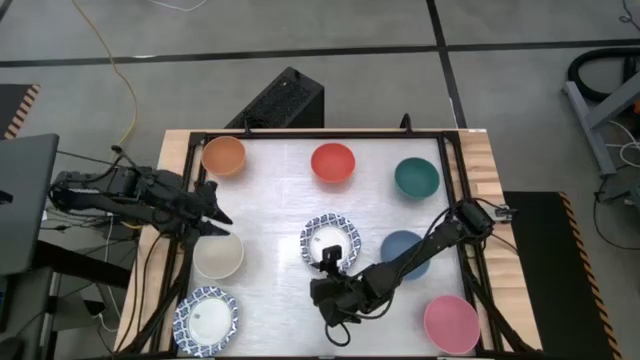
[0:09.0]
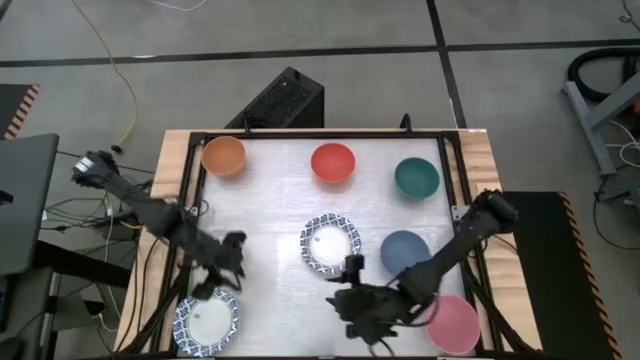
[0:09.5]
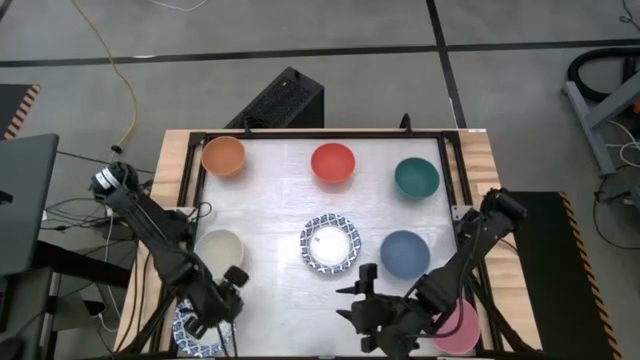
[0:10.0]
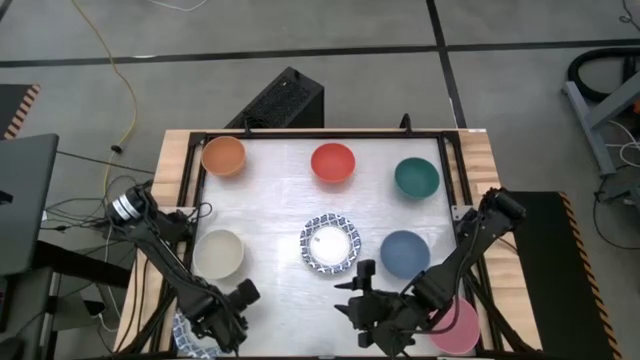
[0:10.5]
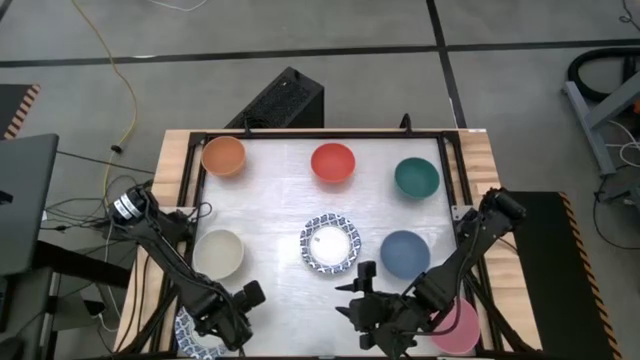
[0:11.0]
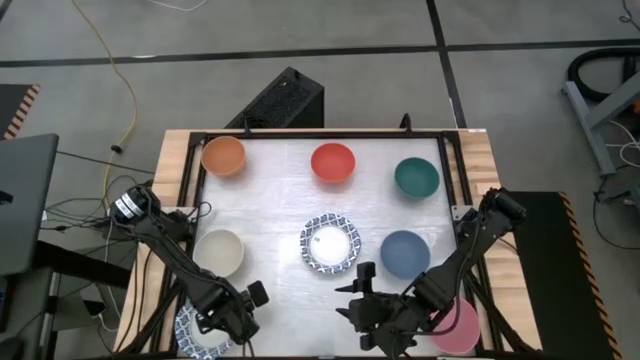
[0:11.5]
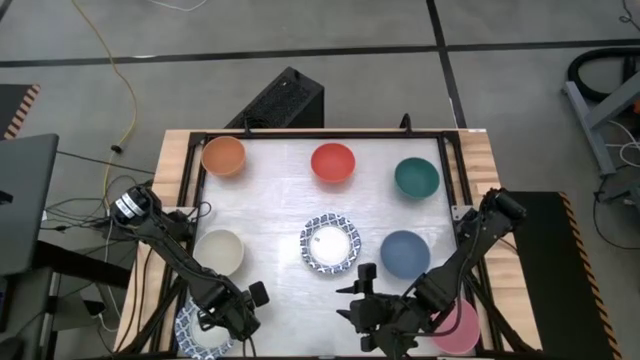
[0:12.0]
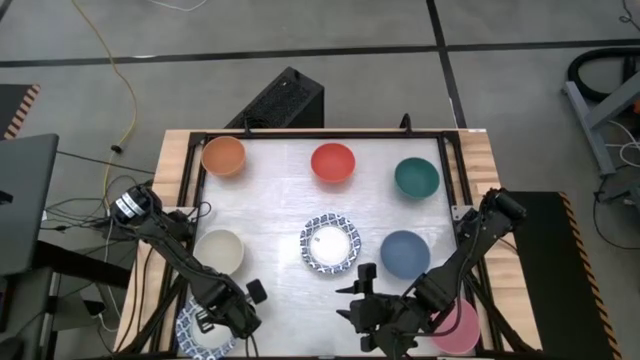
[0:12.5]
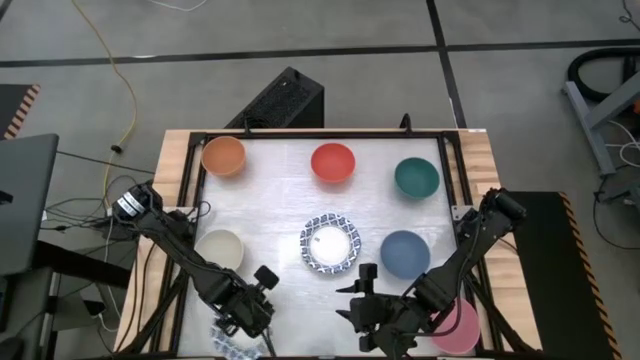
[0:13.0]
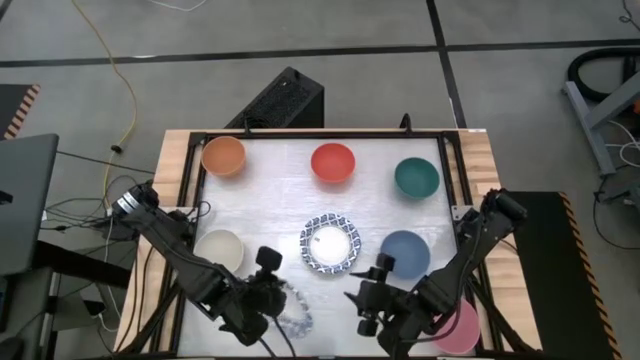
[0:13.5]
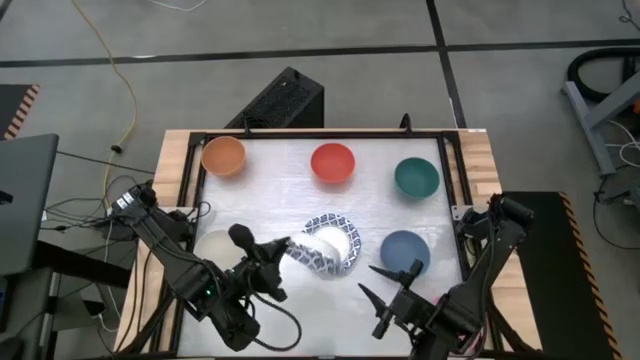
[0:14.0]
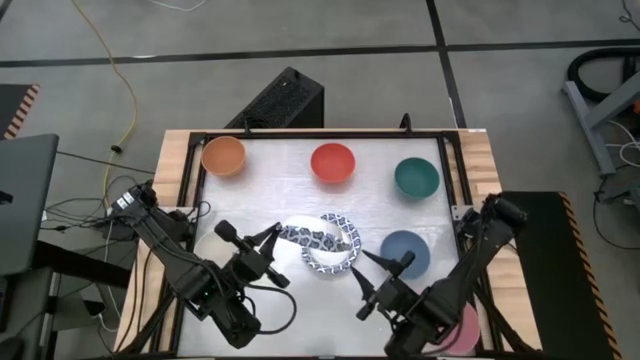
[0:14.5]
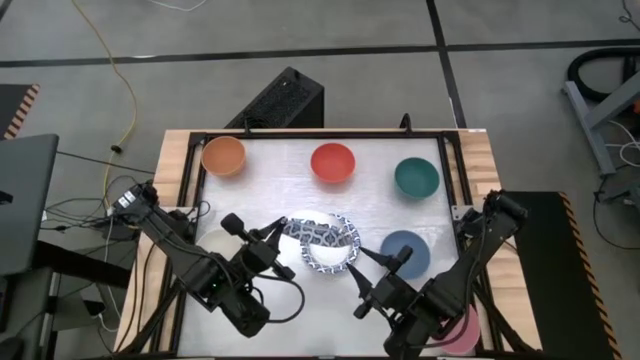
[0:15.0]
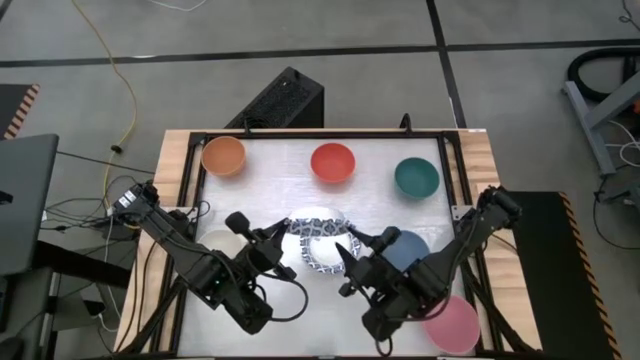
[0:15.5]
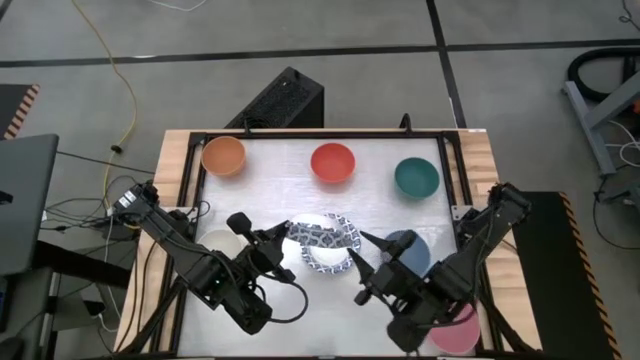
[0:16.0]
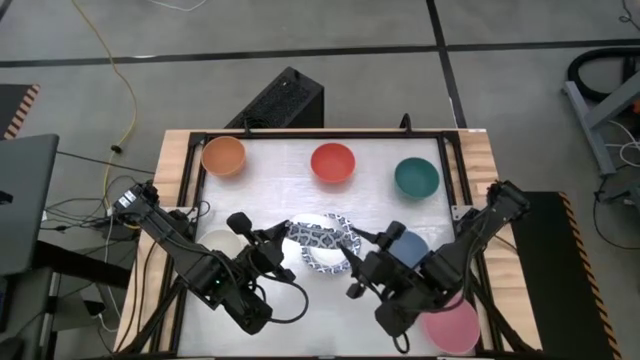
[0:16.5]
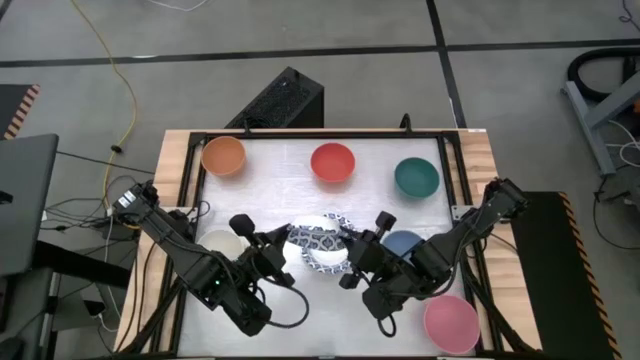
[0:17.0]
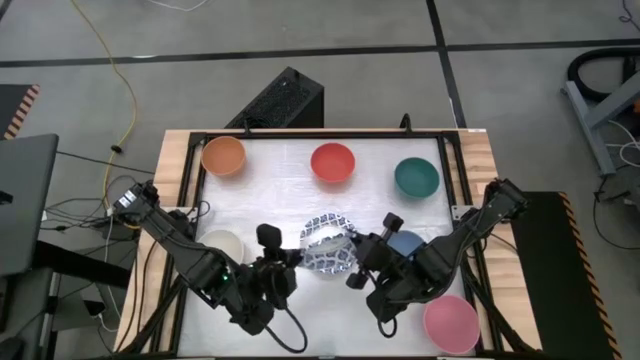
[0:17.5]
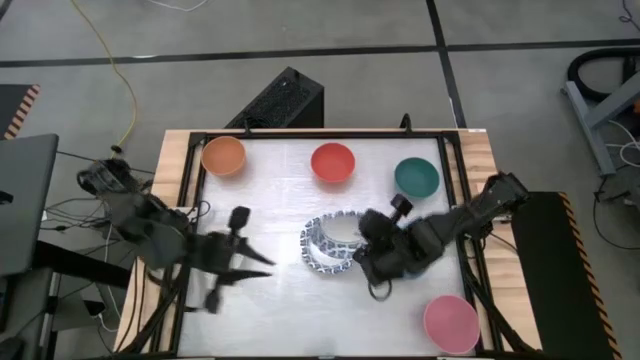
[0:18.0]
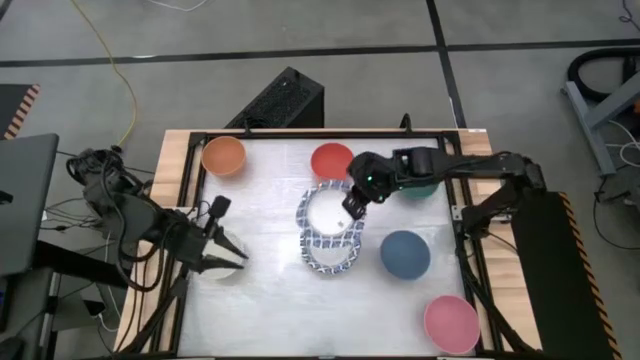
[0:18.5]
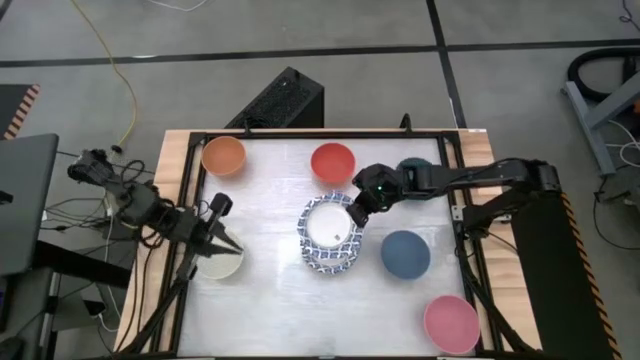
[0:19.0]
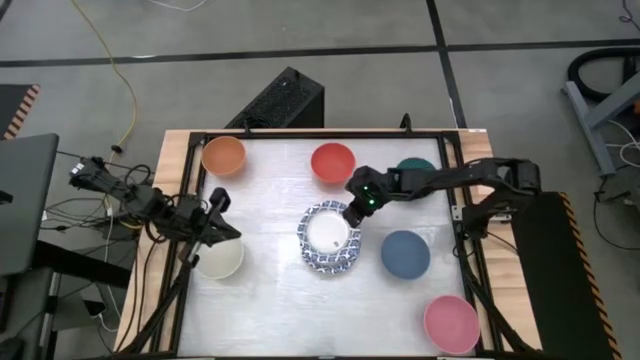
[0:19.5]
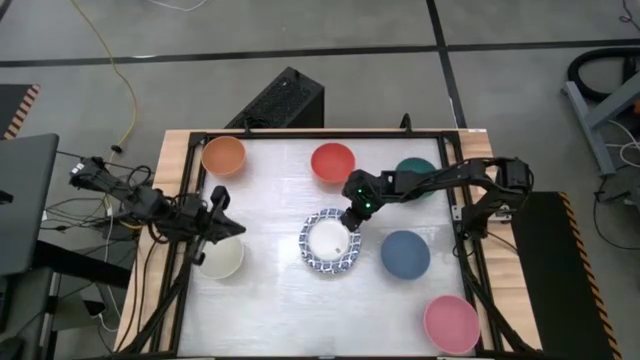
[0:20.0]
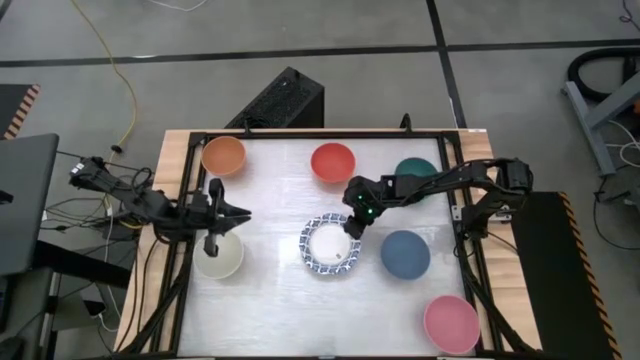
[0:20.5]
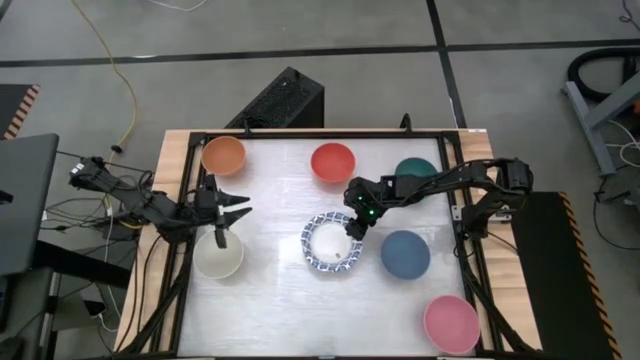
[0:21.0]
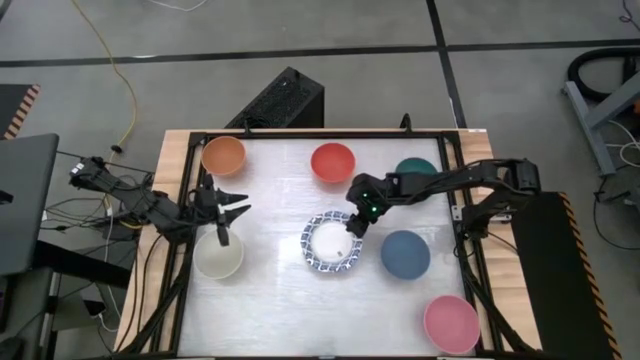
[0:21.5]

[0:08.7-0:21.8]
Stack the bottom white pattern bowl into the top white pattern bowl

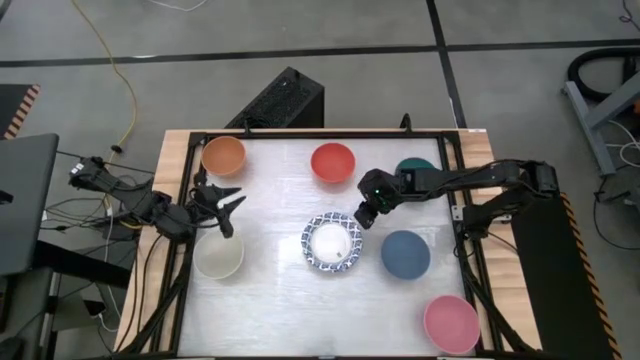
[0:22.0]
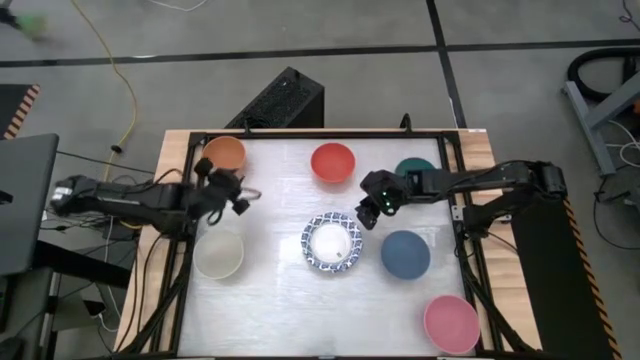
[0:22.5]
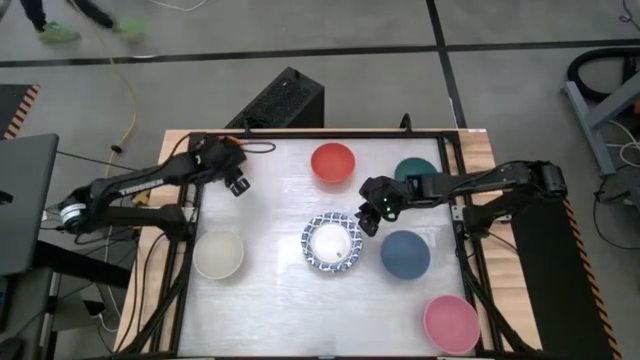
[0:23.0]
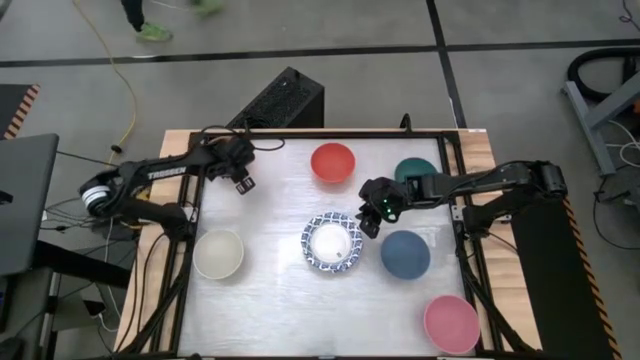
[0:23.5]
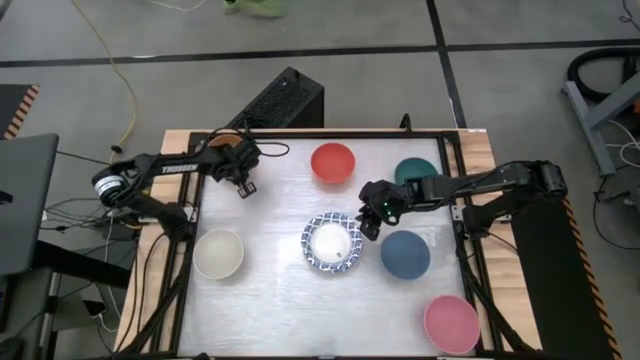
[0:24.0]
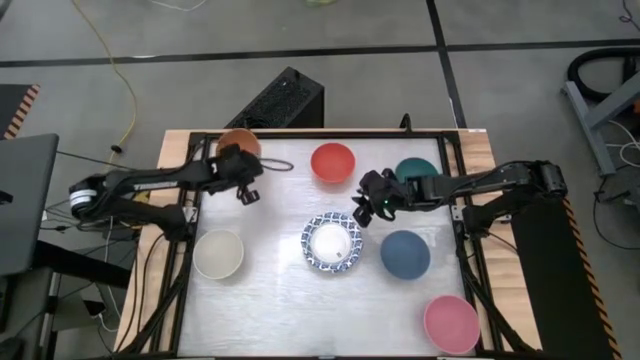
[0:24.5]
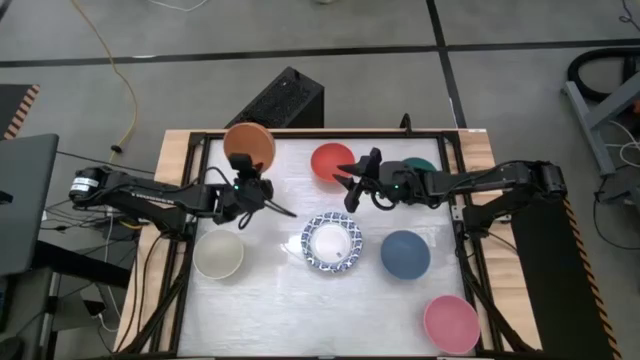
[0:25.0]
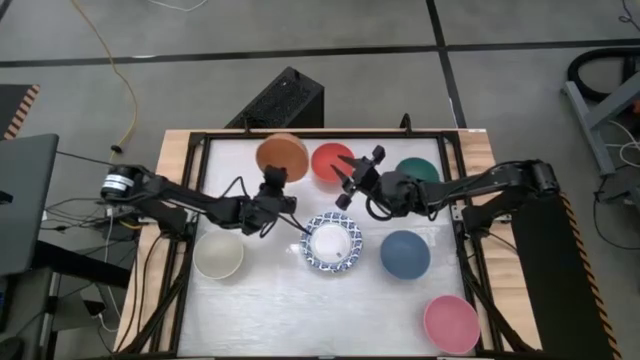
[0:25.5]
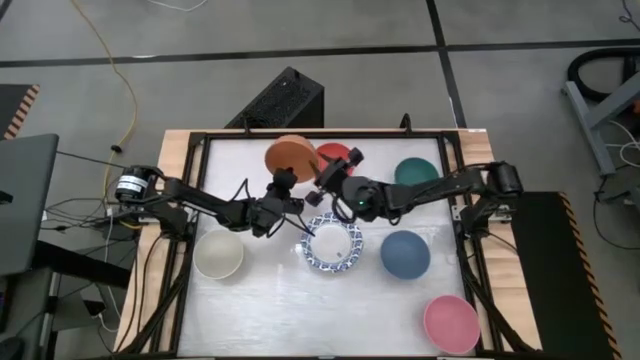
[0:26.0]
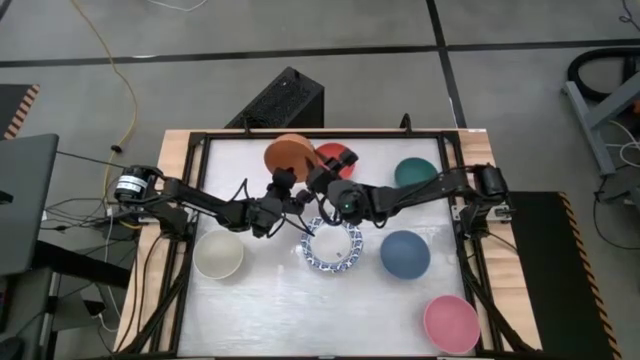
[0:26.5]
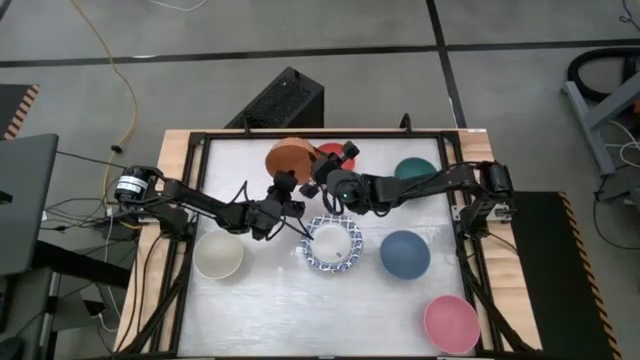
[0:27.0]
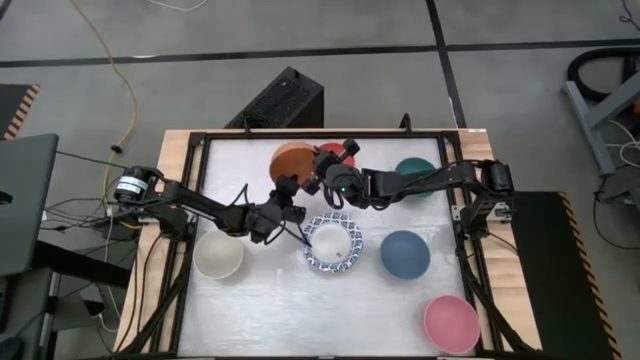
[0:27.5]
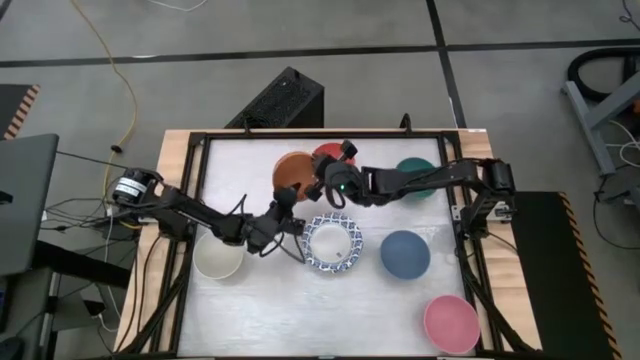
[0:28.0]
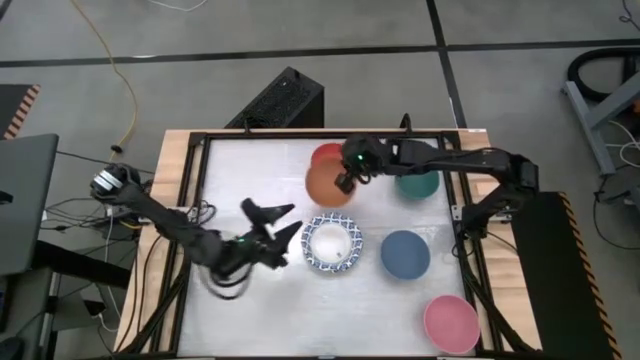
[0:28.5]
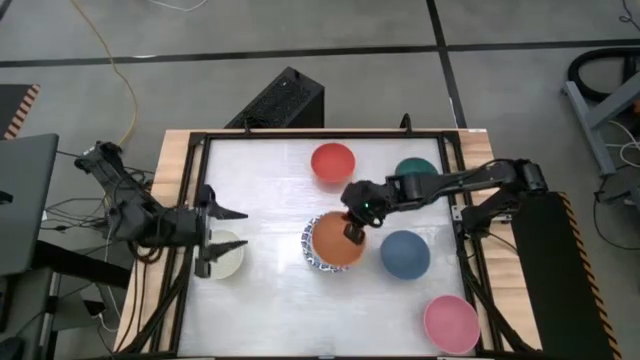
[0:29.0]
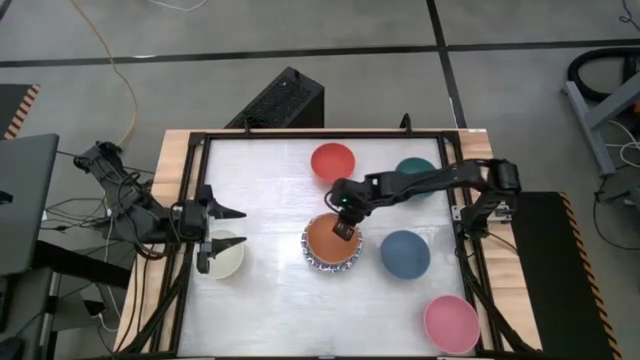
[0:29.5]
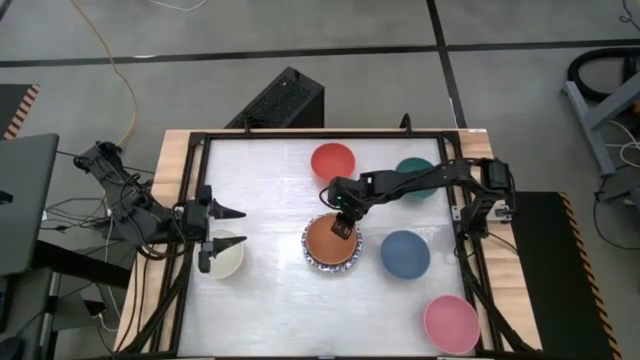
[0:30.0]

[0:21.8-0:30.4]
Stack the brown bowl into the white pattern bowl
